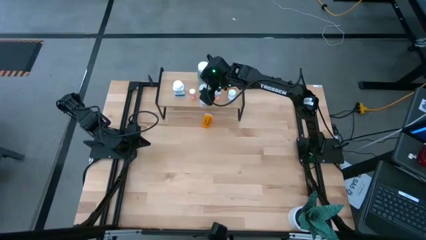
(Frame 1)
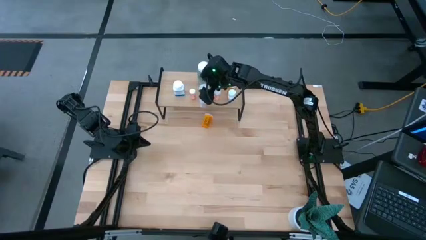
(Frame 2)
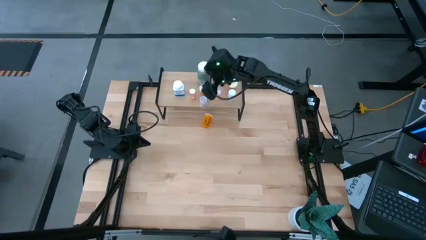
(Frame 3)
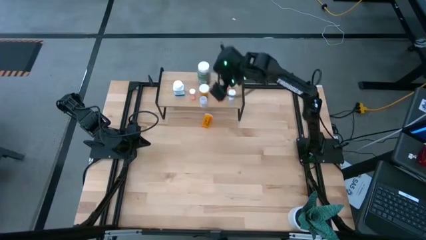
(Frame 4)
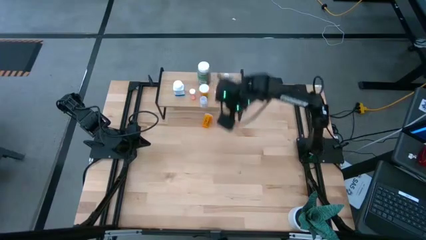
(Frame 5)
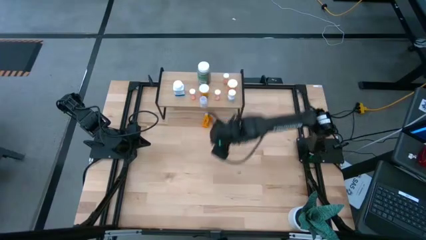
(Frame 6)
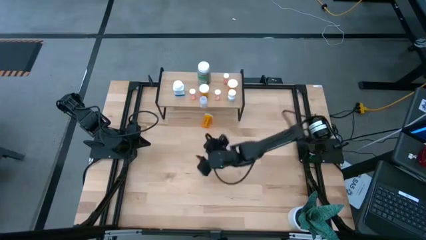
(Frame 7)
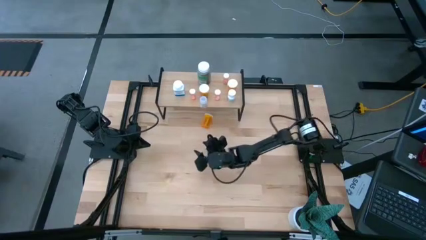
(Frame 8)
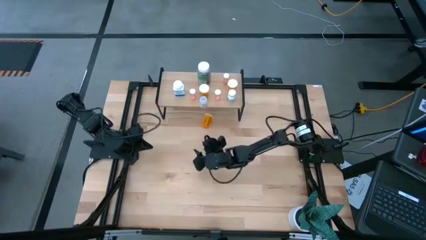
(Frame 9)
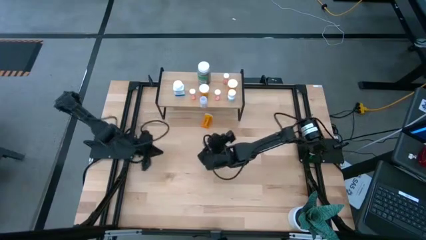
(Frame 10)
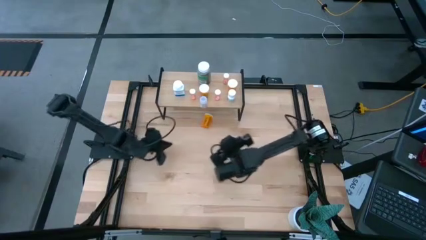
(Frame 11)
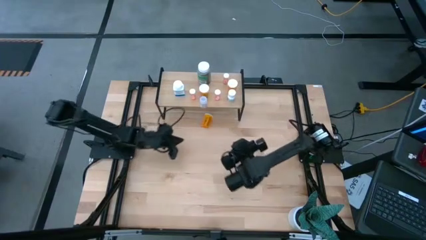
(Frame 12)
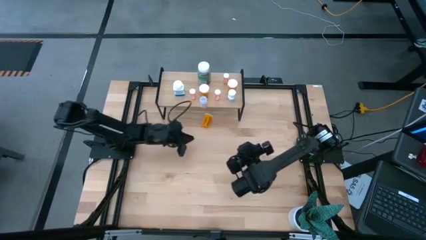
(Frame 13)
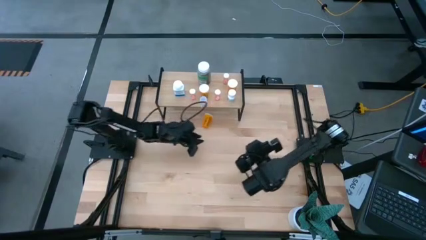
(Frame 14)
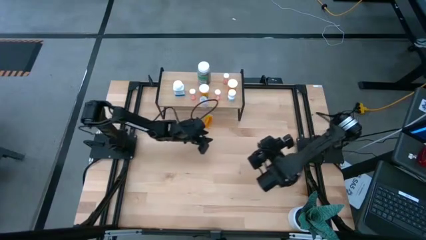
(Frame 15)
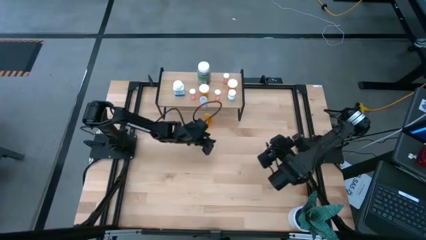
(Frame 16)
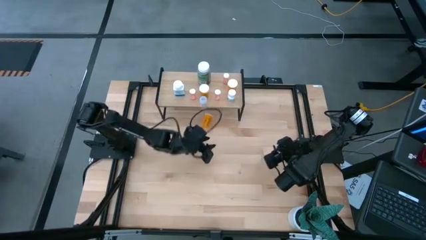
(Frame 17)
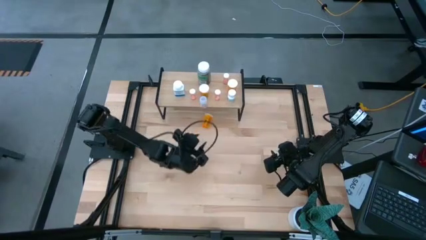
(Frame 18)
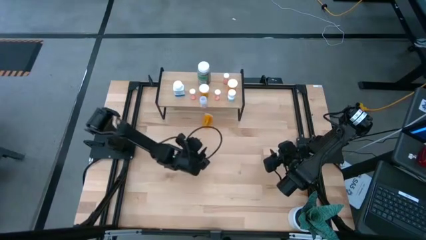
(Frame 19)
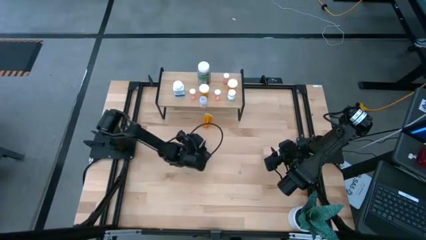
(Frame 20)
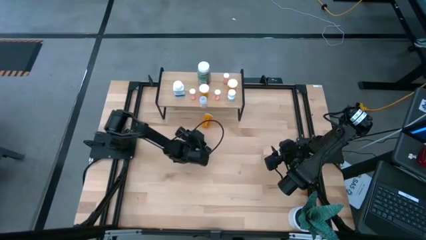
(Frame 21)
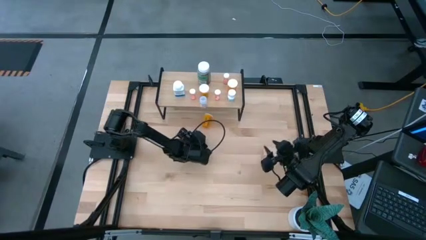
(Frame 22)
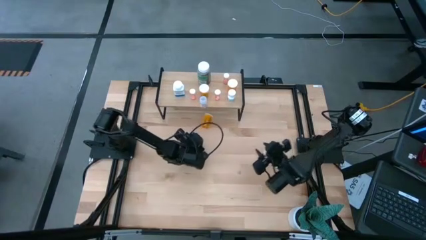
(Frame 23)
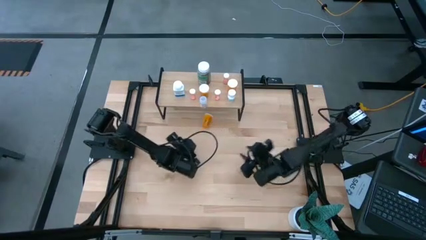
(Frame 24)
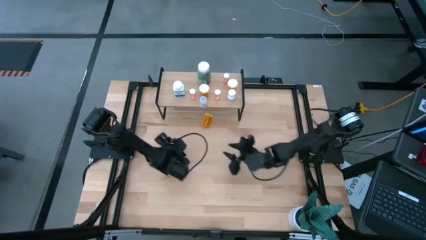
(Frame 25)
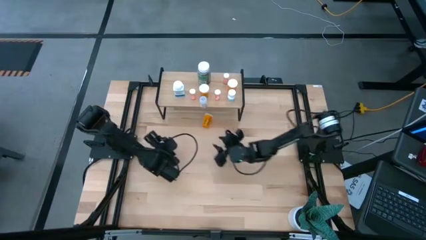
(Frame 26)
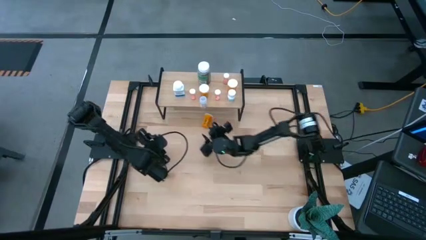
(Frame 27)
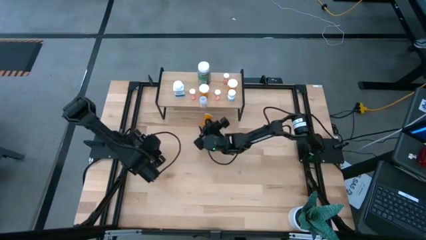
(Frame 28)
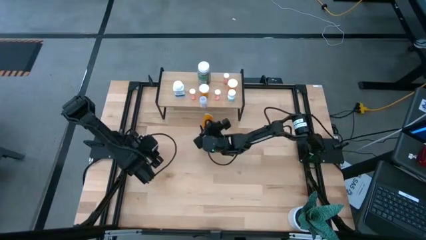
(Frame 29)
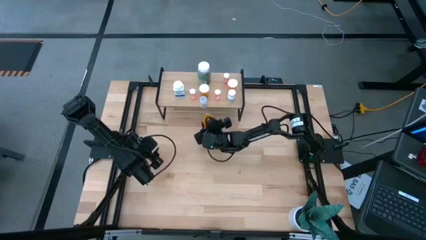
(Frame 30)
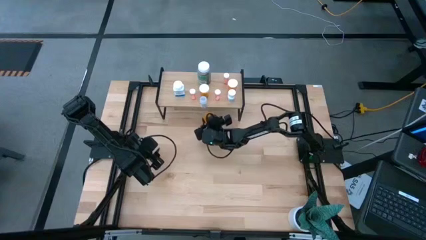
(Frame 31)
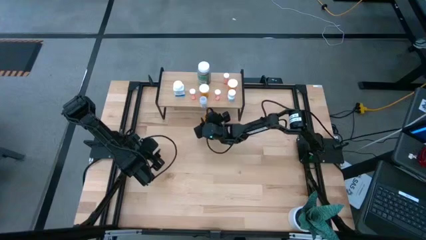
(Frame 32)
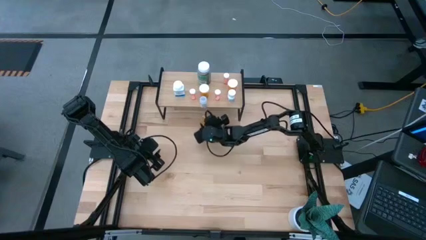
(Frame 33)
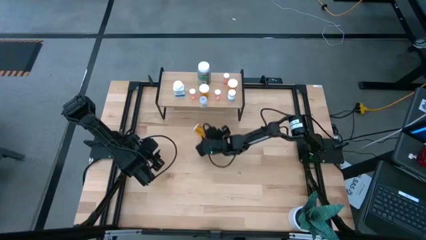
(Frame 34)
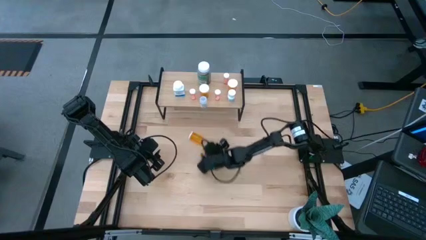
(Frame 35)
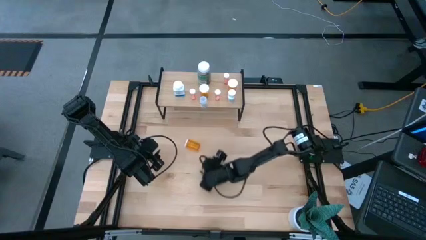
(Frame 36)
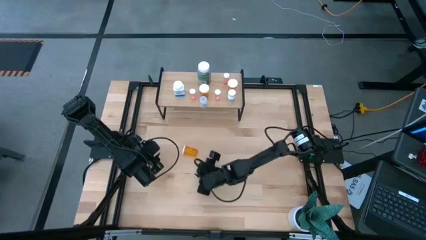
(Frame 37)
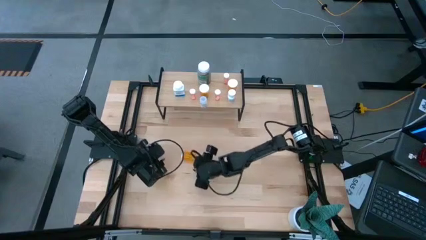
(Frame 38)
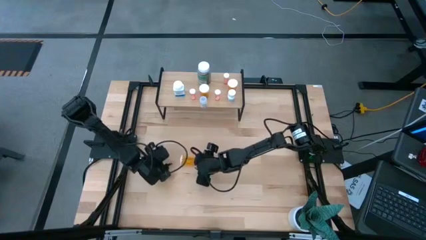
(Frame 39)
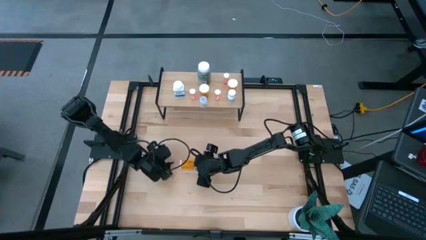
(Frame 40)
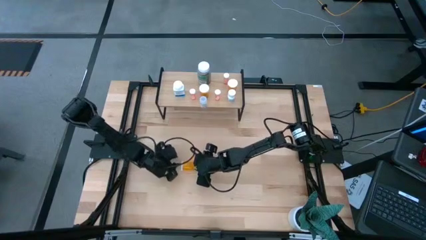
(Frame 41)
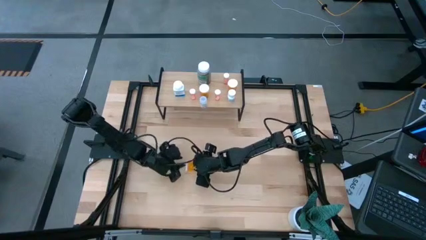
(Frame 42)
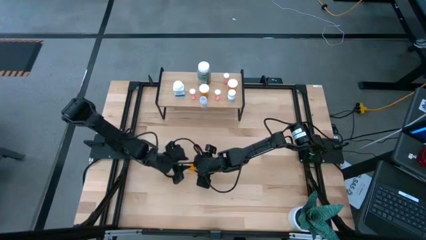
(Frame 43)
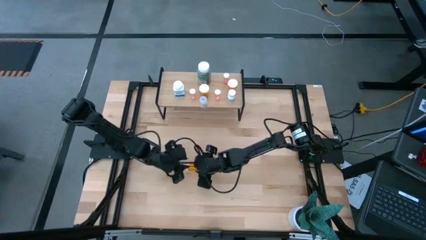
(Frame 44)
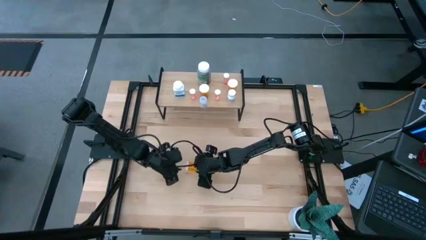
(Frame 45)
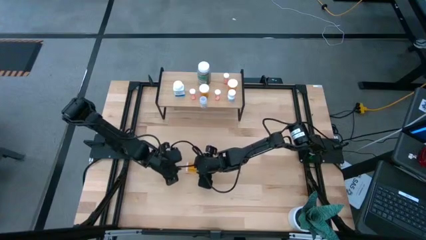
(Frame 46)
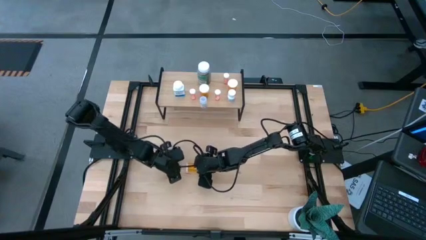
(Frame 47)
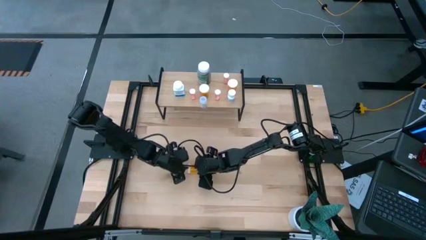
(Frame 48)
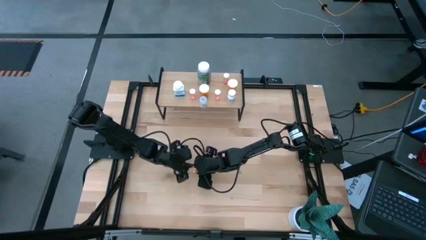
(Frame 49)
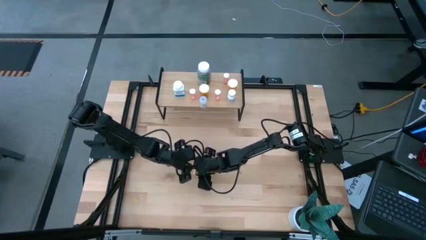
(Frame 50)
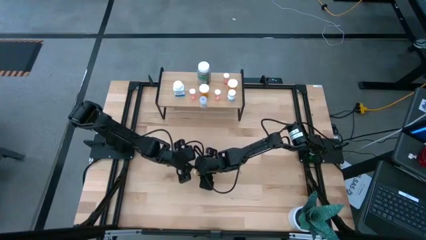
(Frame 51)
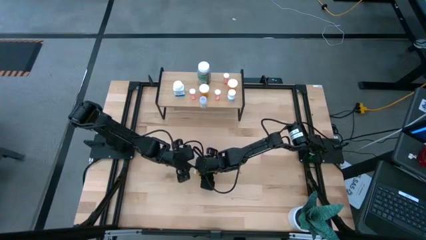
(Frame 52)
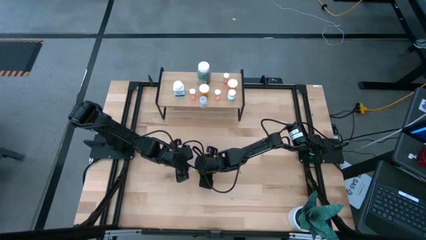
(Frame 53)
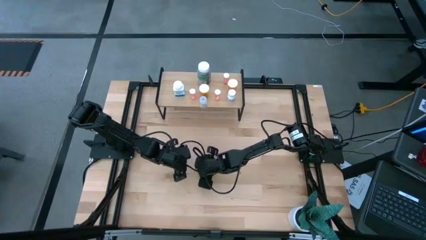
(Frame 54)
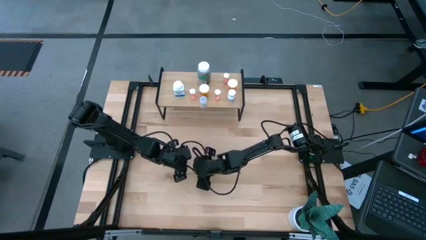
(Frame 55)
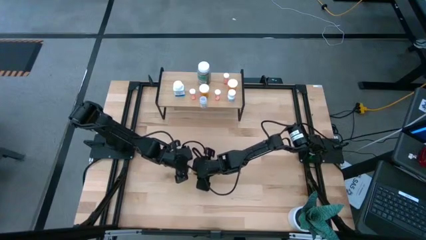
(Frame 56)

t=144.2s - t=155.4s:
Task: Pick and place medicine bottles onto shelf by color
Put the orange pill bottle on the shelf

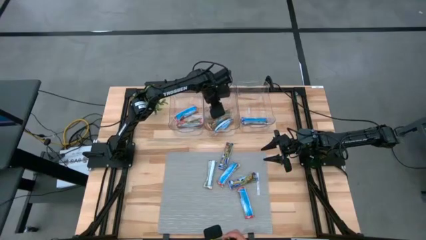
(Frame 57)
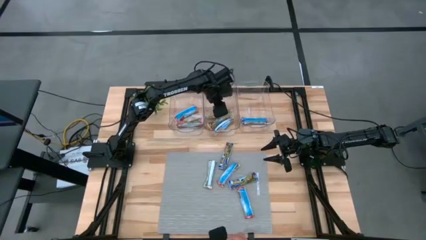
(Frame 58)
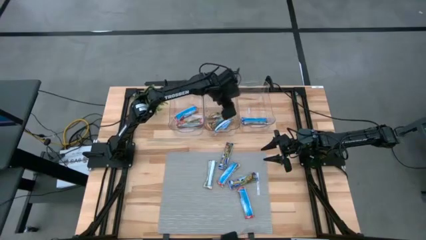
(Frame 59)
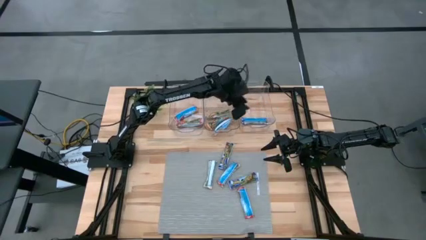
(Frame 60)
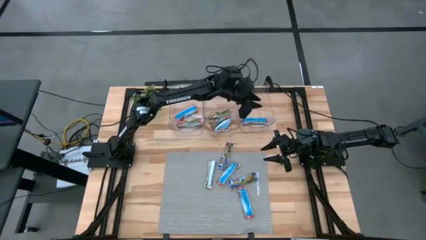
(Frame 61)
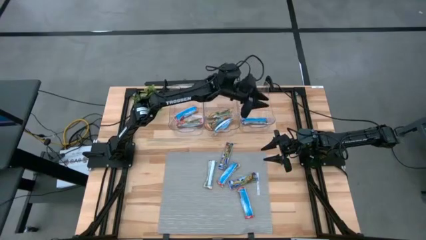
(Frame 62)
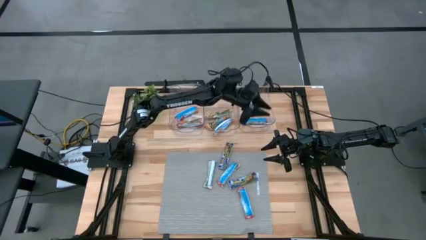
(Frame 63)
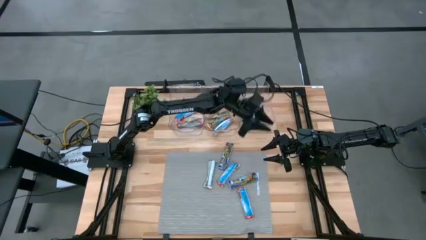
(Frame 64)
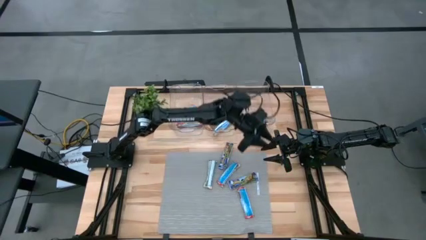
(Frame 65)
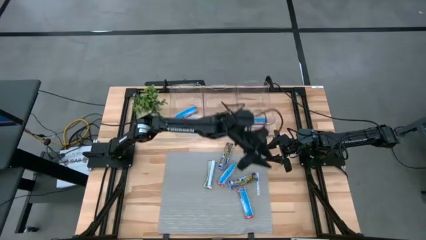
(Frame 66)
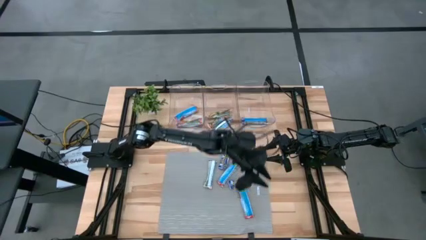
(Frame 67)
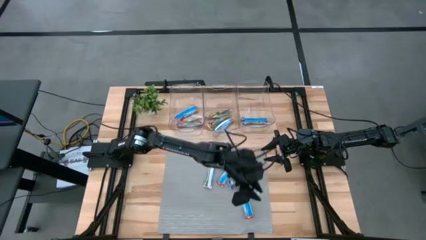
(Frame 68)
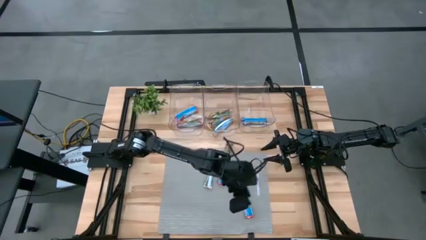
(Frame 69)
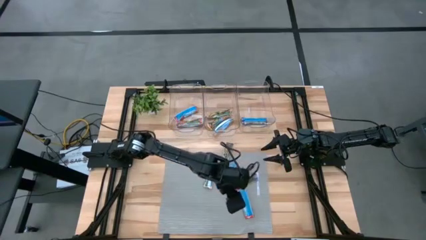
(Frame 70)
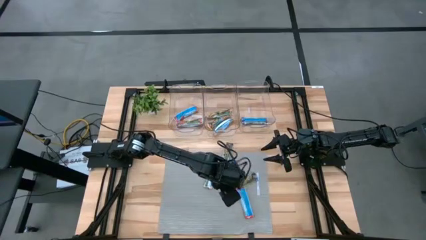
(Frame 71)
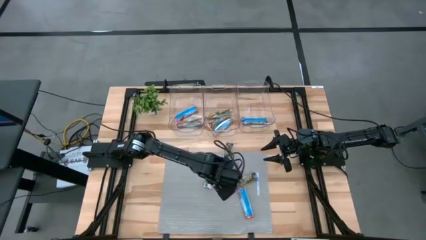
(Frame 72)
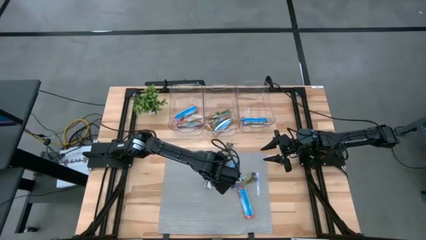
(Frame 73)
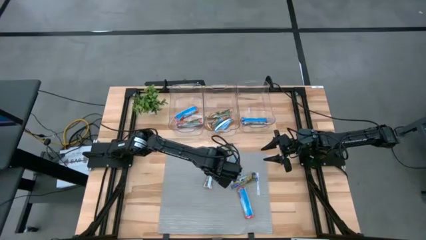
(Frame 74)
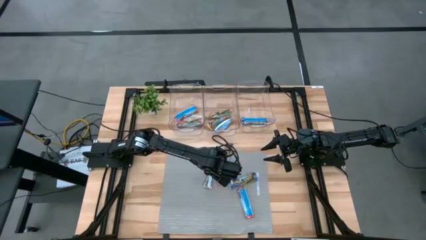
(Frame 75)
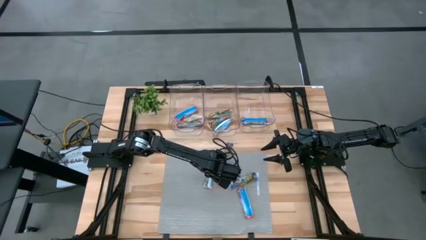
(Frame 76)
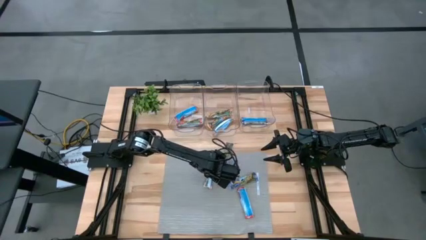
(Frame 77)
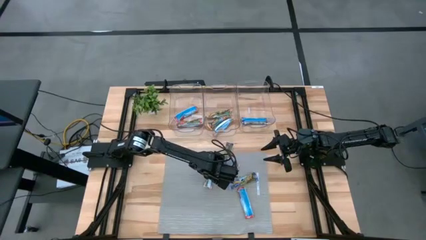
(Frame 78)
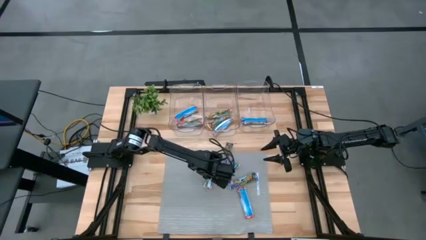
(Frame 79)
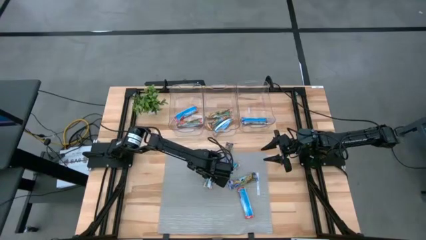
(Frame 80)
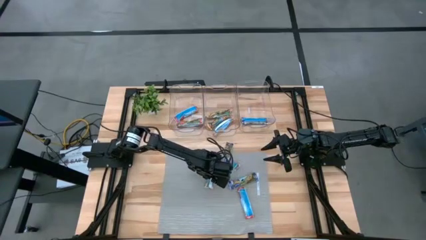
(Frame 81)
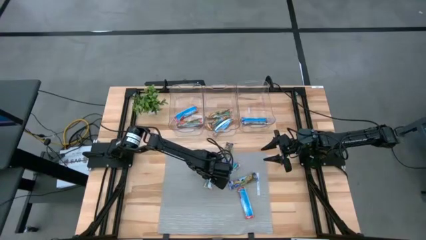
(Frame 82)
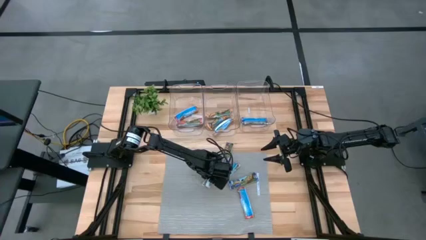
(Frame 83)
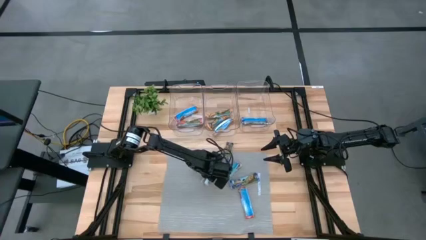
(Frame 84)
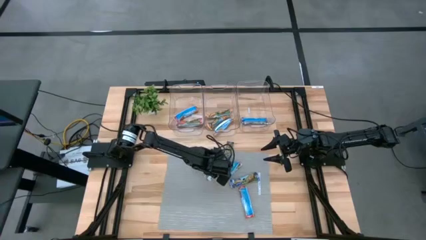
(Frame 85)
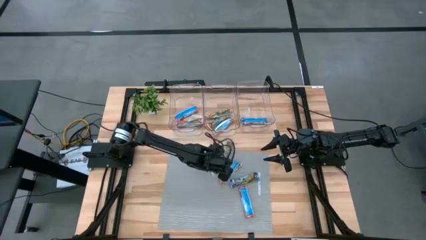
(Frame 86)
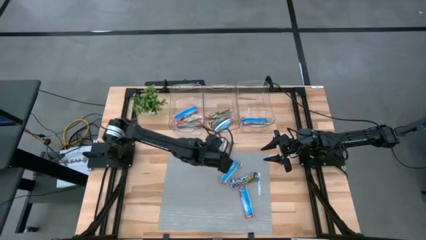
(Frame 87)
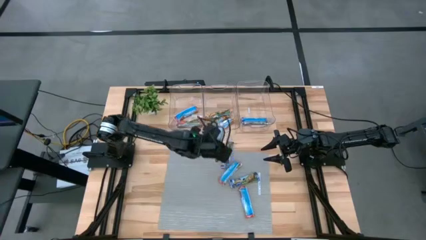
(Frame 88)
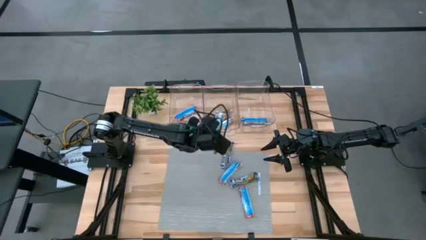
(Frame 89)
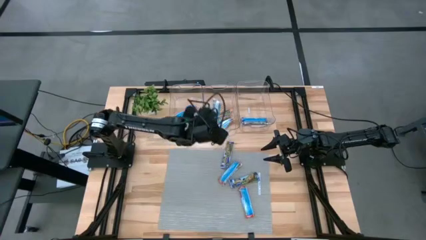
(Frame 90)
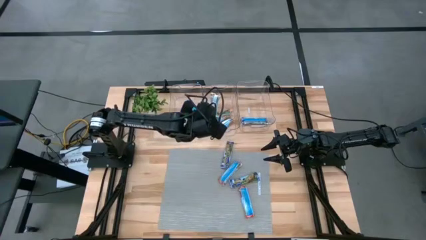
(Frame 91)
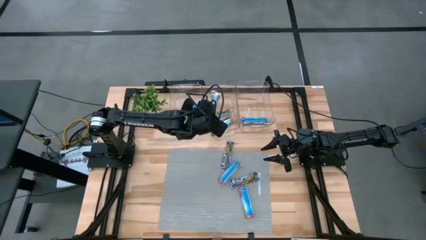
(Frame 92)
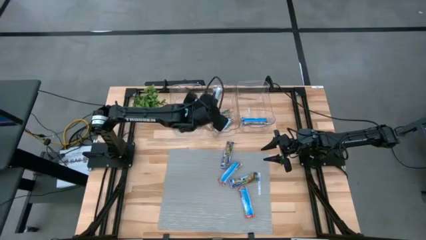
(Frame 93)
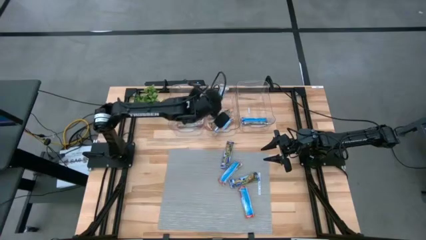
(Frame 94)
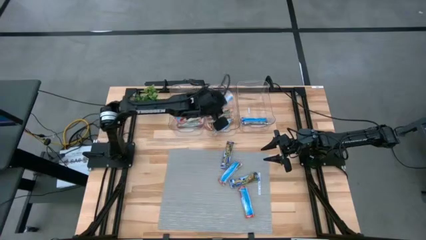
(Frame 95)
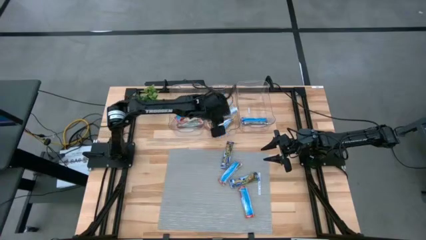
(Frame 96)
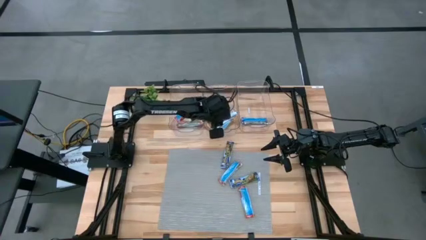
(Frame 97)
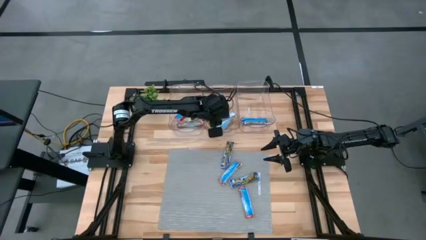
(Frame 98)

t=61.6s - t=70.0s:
Task: Pick and place Granola Bars by type
Put the yellow granola bar into the middle transparent bin
